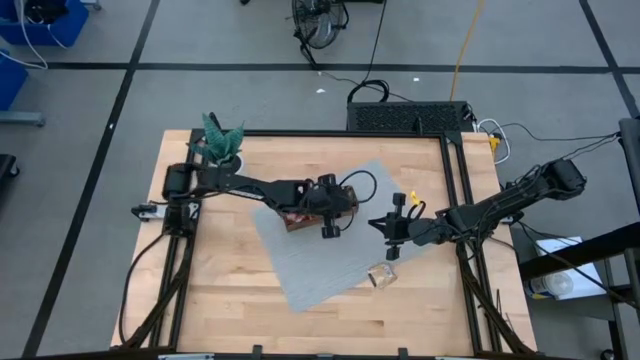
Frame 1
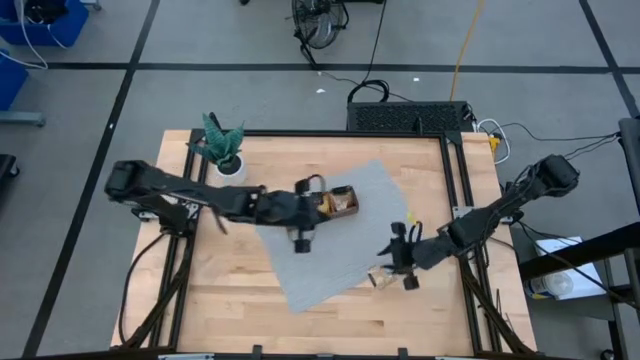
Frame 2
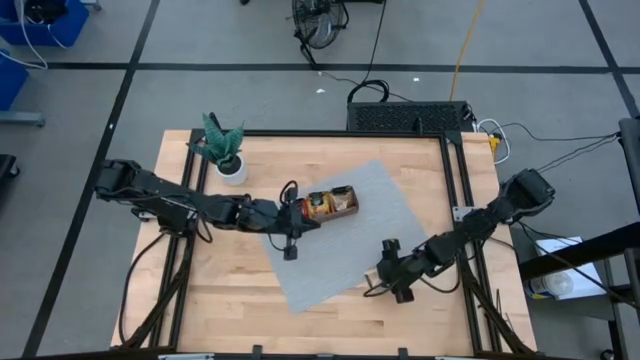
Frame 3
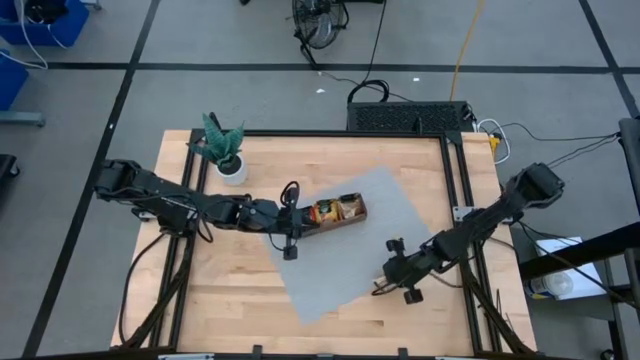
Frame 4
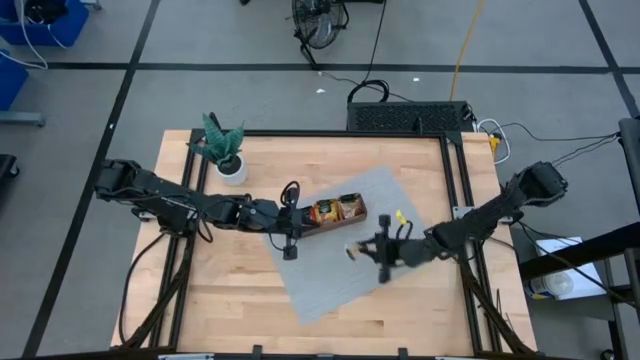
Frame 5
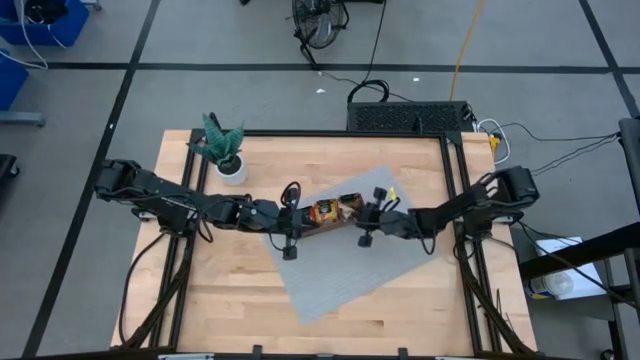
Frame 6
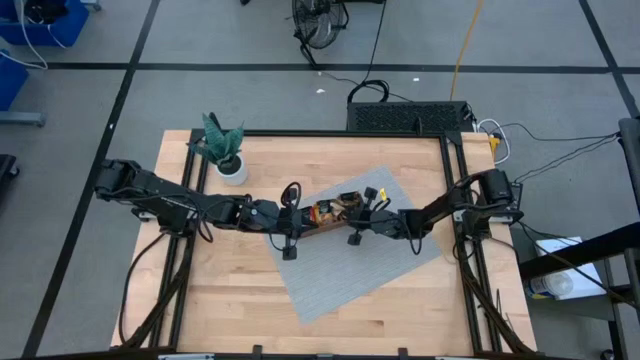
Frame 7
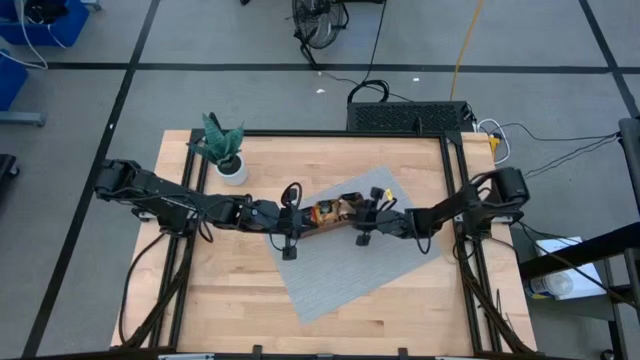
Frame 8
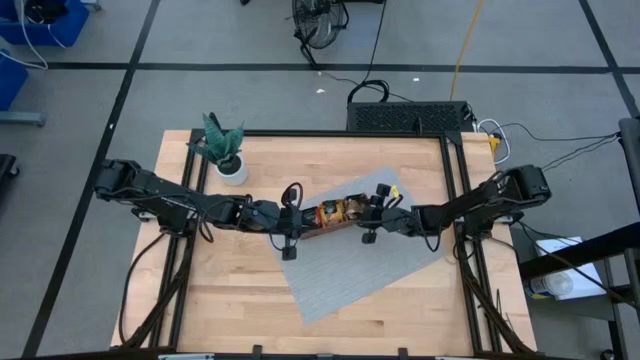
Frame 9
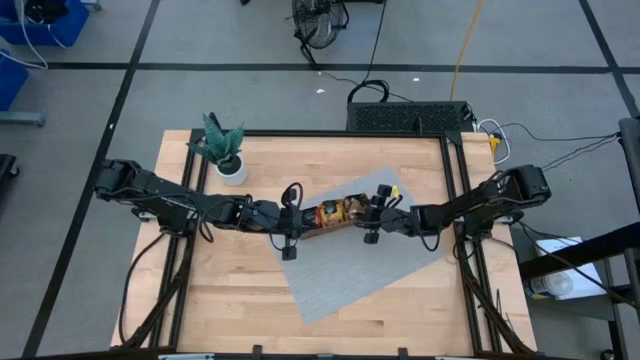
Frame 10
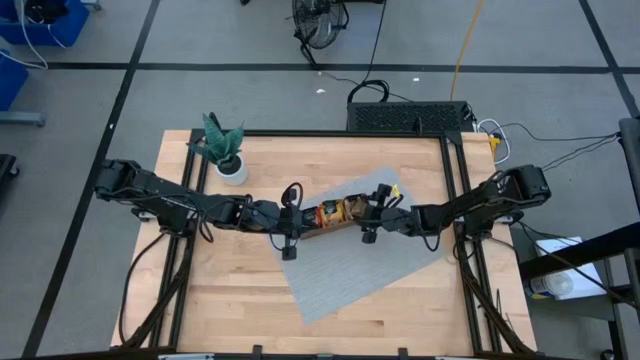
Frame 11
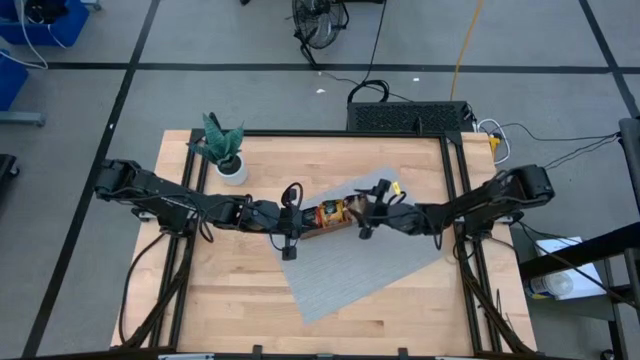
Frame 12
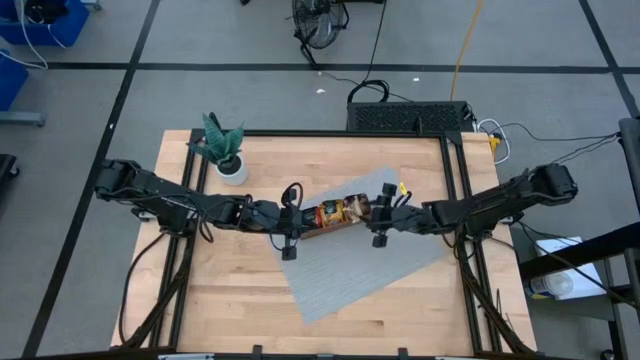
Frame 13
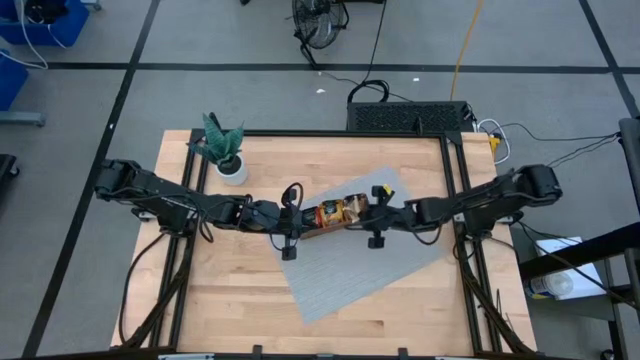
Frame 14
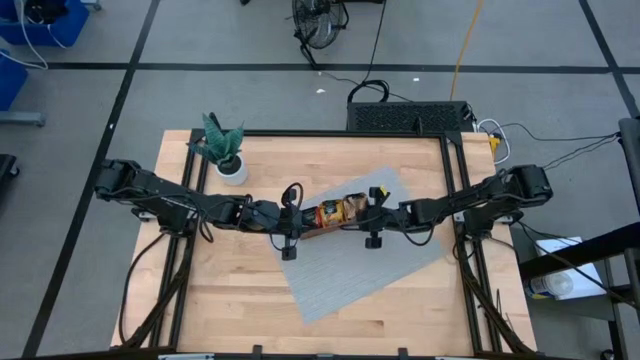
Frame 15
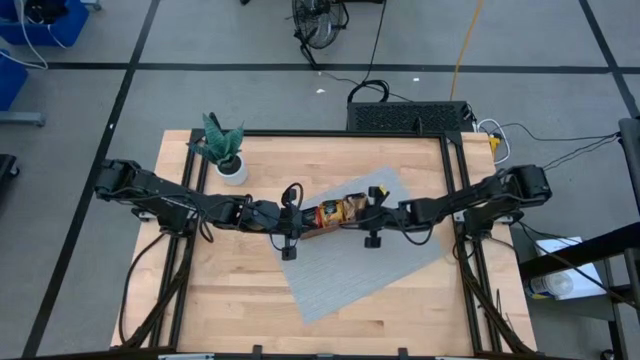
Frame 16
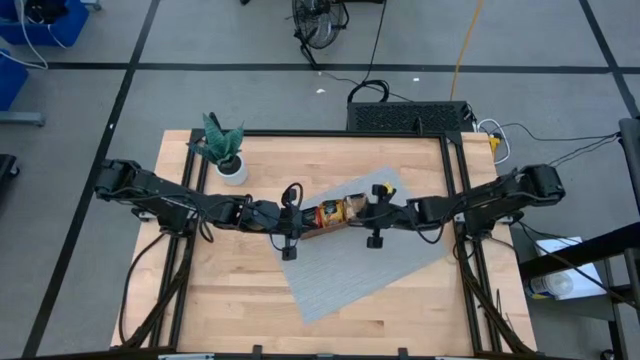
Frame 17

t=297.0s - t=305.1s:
Task: Pick & Place Tea
Put the brown tea into the right part of the wooden organizer

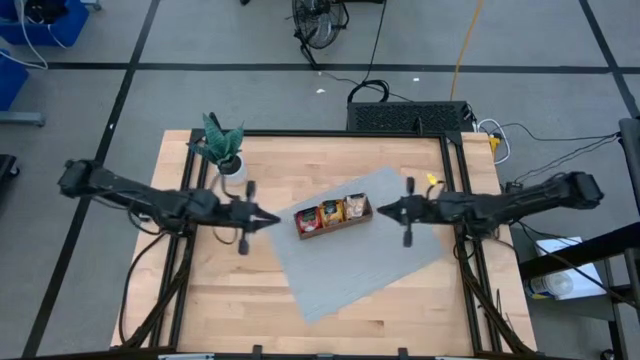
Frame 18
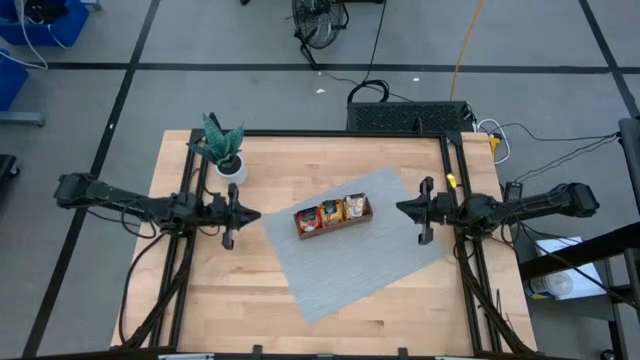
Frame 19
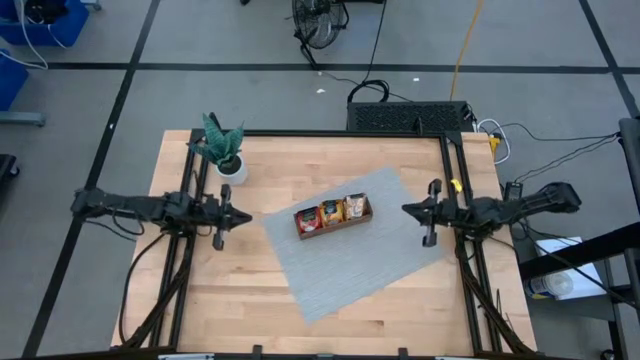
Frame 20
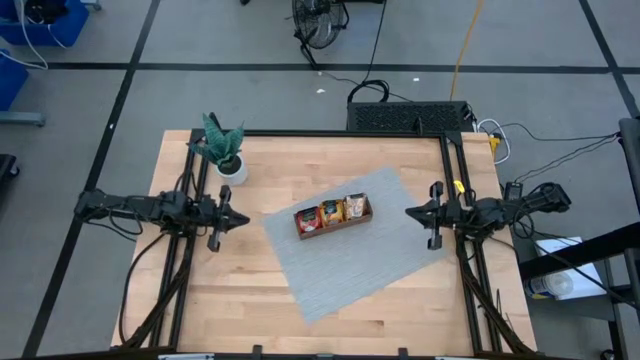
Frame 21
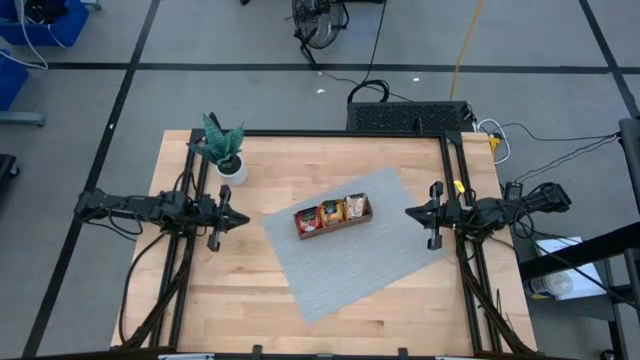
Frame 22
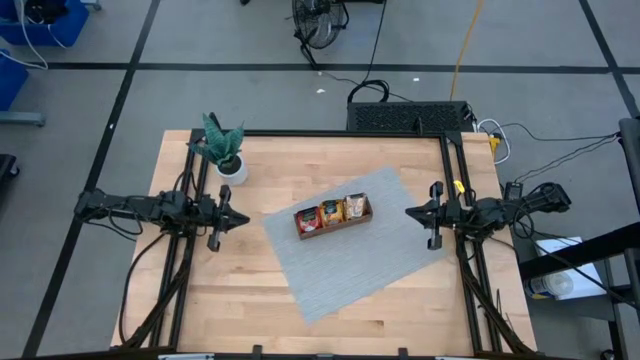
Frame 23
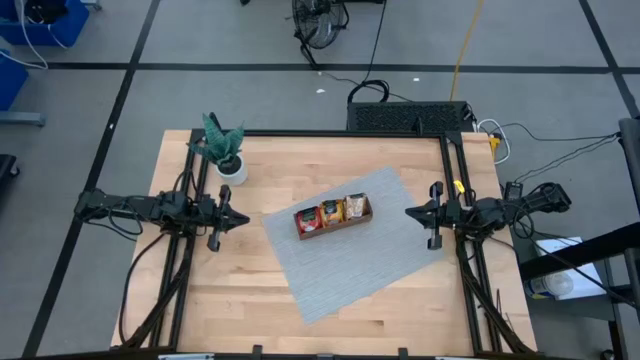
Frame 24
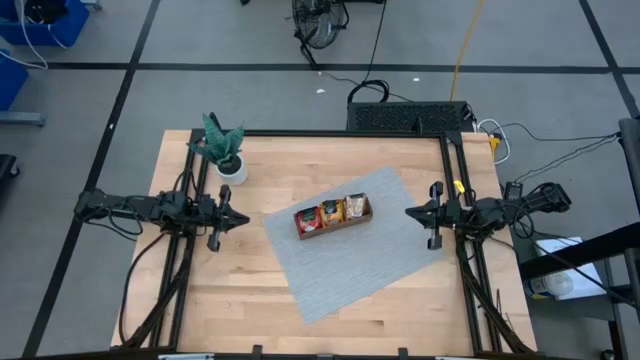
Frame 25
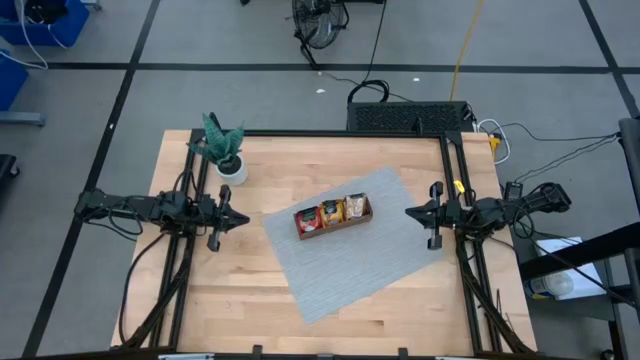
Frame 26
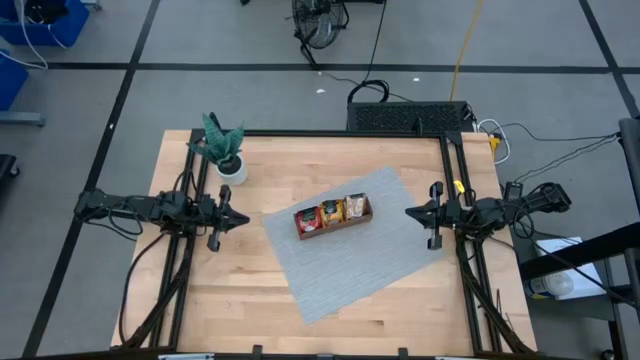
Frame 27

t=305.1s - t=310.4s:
Return to Home Position

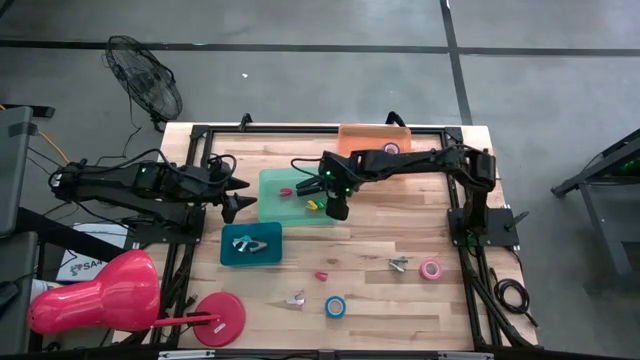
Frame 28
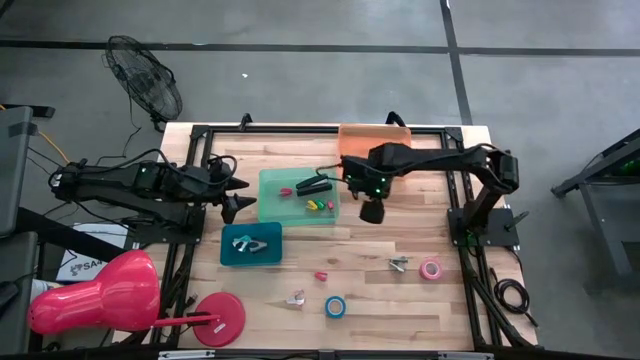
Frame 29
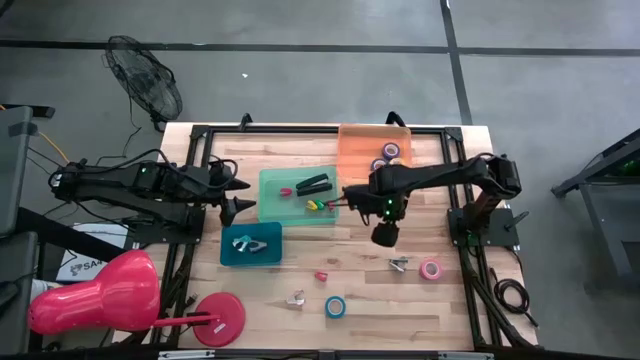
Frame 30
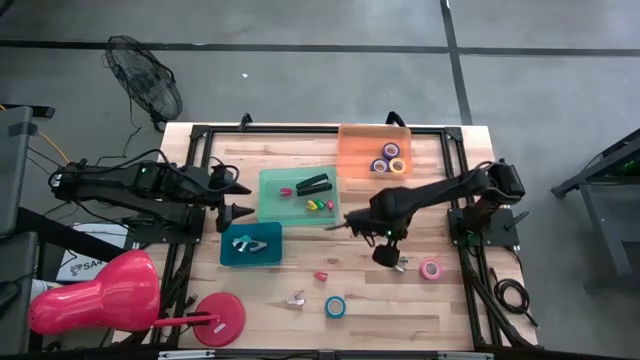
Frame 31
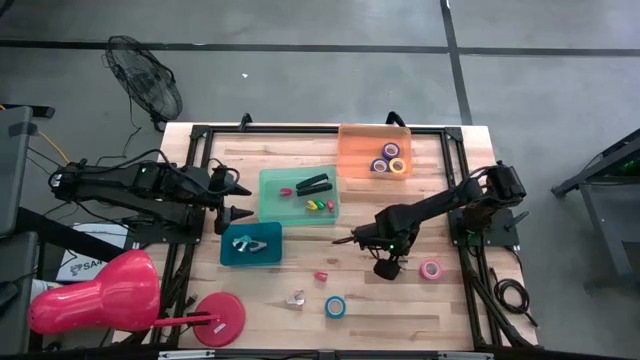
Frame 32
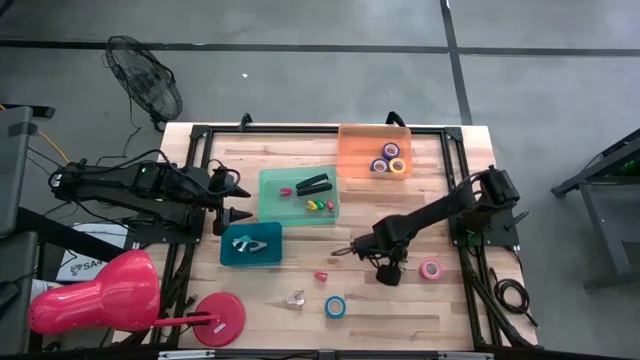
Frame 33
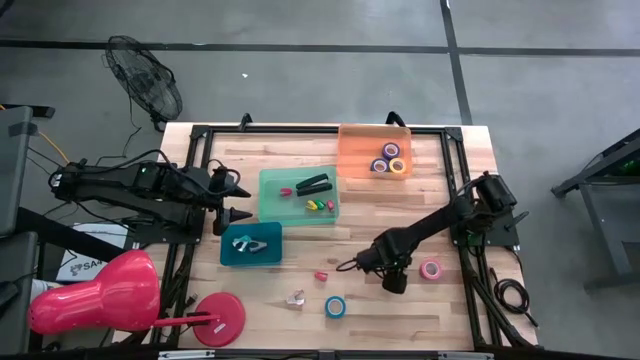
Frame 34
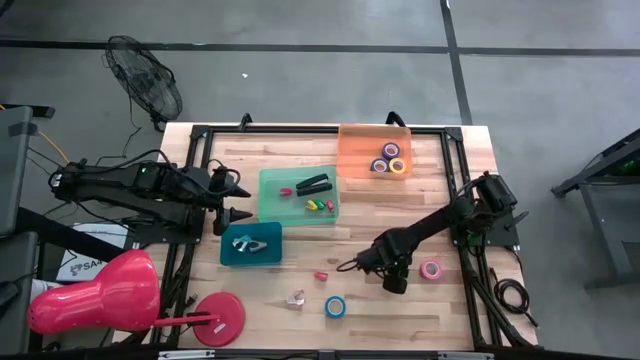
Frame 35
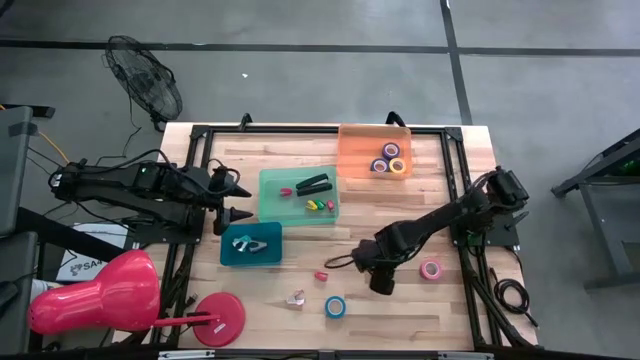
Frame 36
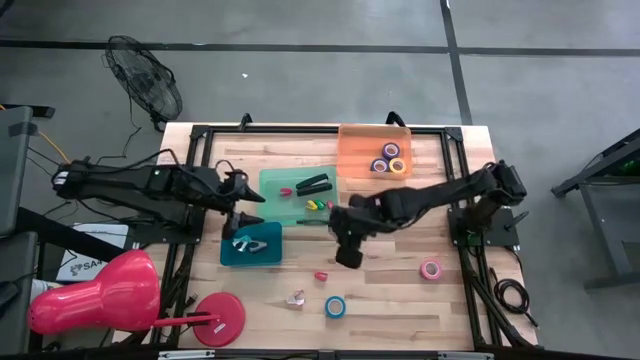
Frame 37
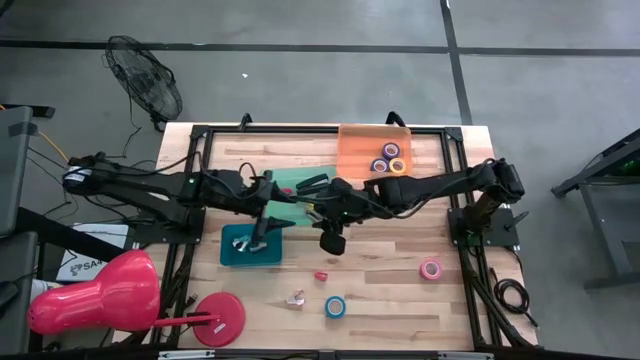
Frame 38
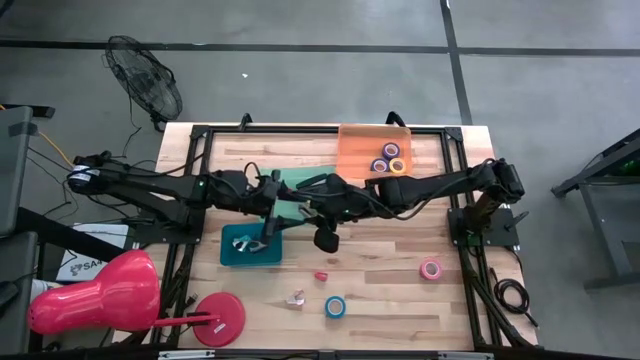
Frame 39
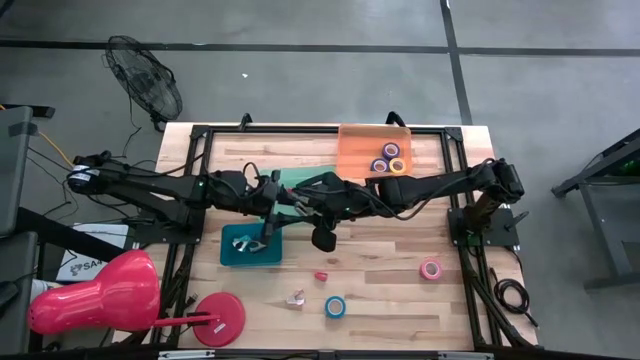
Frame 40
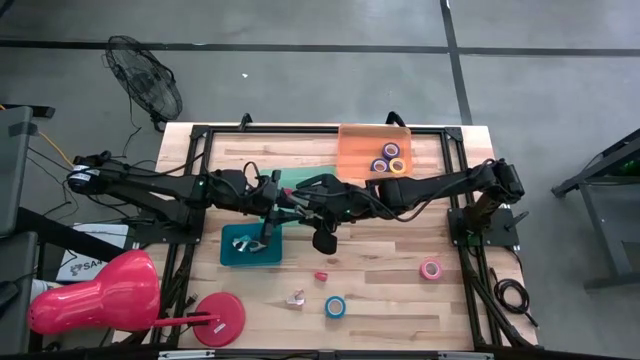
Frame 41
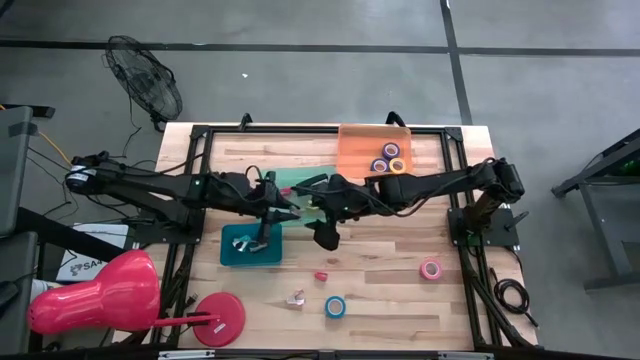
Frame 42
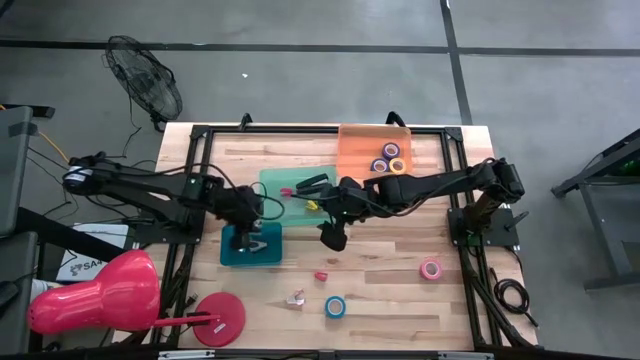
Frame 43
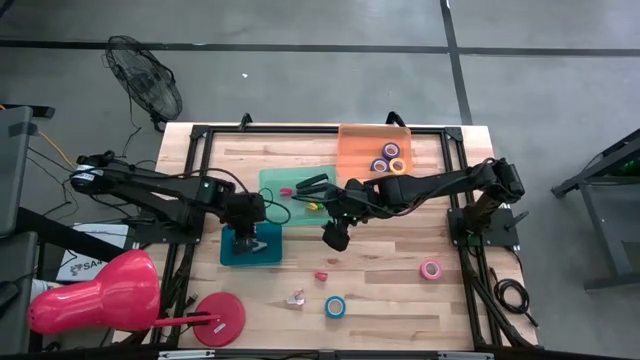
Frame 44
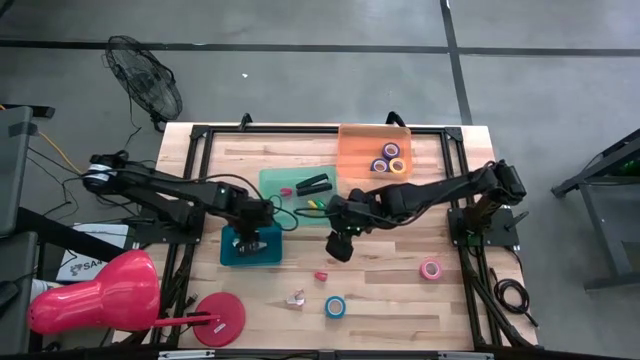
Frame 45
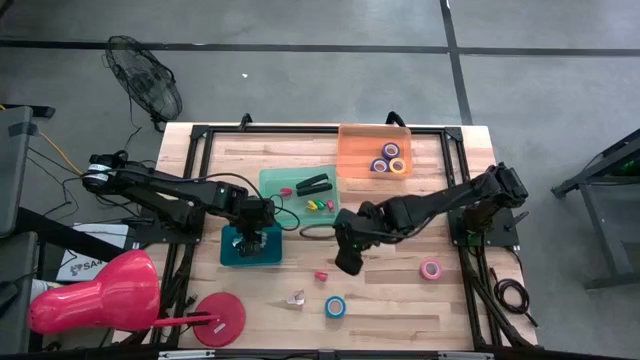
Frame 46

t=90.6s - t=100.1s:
Task: Pick and place Stapler, Stapler remover, tape
Put the grey staple remover in the blue bin
